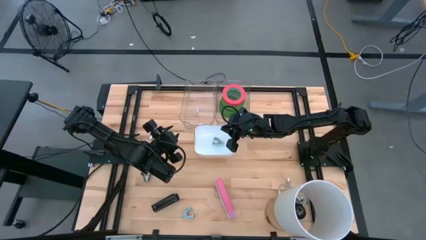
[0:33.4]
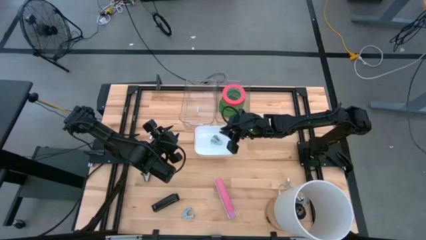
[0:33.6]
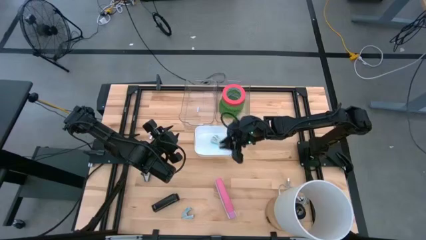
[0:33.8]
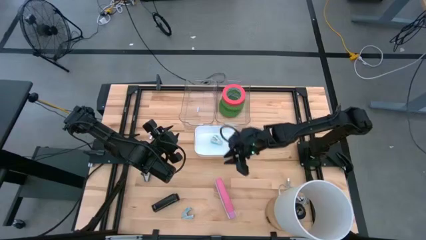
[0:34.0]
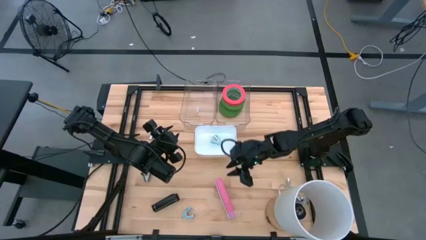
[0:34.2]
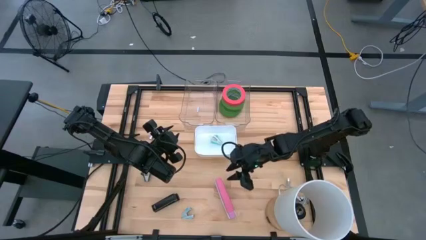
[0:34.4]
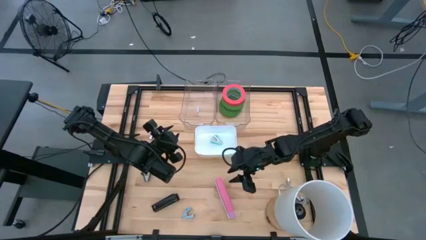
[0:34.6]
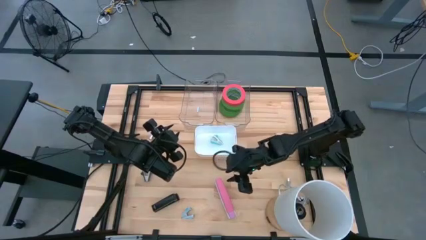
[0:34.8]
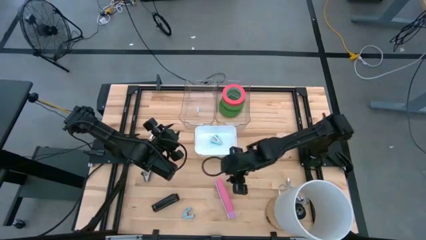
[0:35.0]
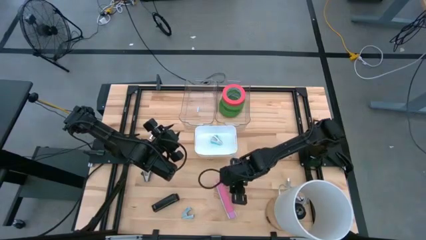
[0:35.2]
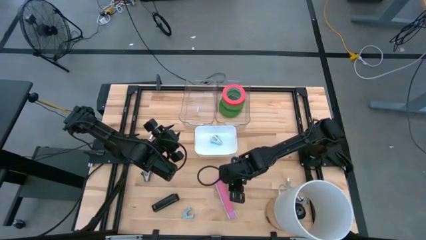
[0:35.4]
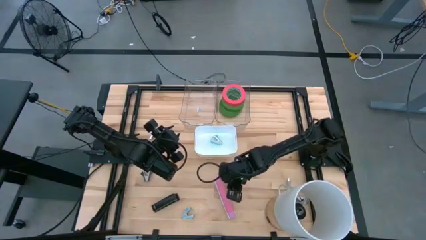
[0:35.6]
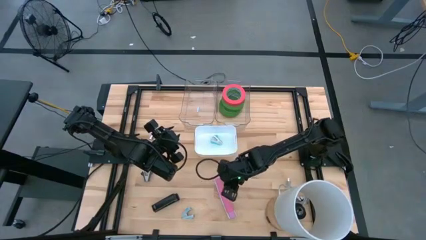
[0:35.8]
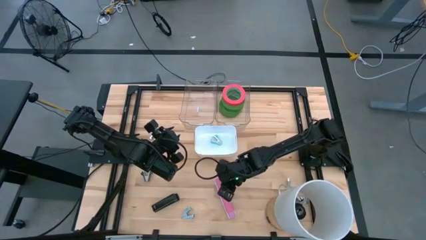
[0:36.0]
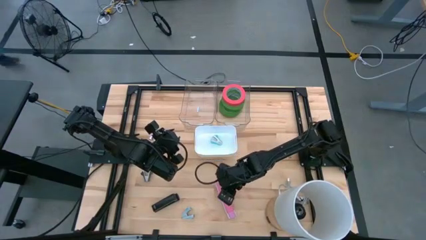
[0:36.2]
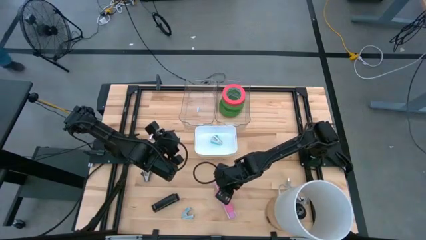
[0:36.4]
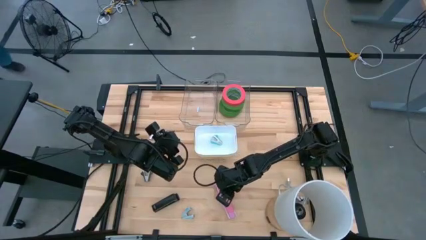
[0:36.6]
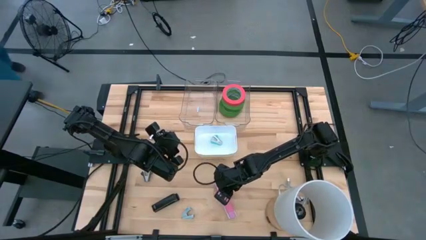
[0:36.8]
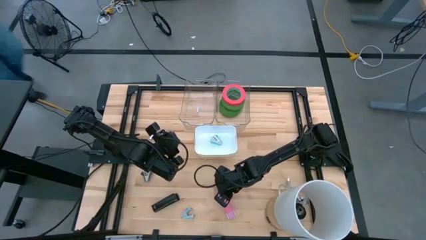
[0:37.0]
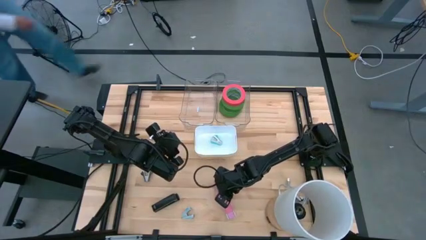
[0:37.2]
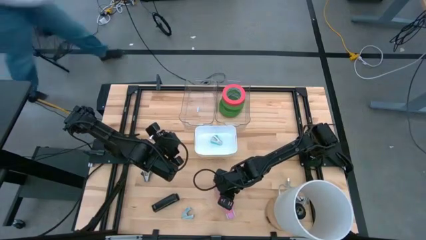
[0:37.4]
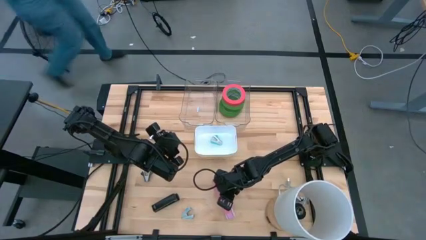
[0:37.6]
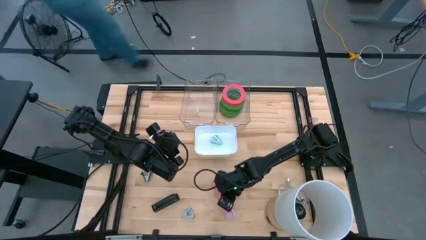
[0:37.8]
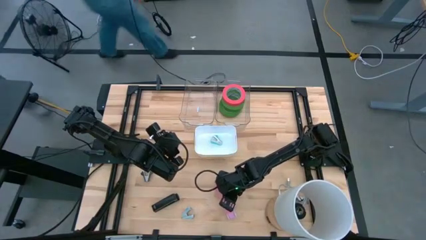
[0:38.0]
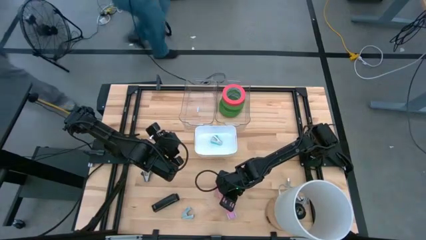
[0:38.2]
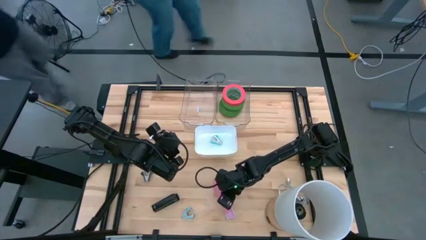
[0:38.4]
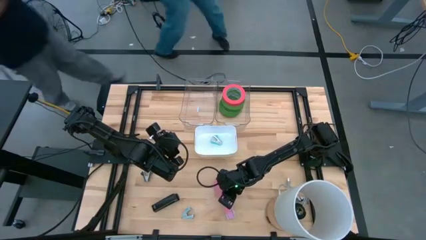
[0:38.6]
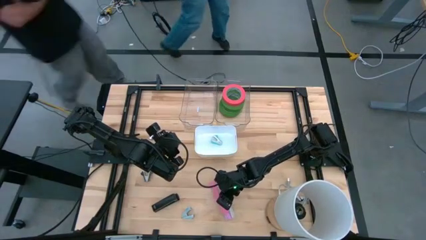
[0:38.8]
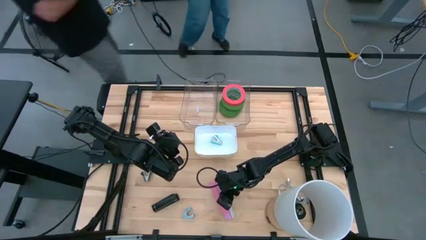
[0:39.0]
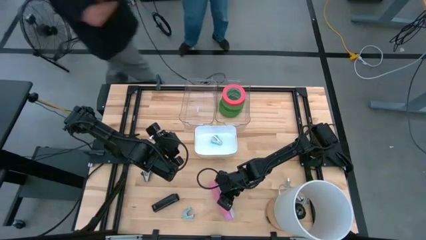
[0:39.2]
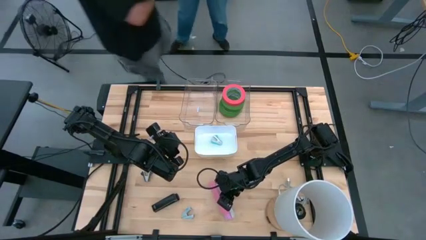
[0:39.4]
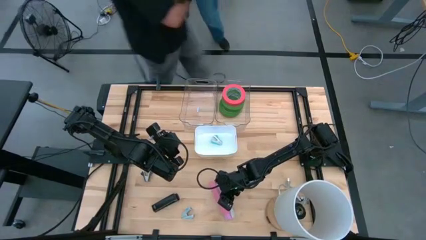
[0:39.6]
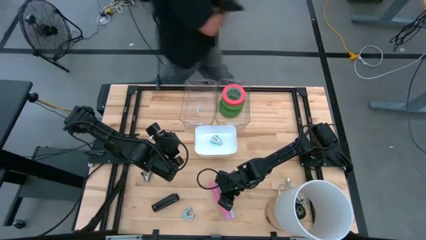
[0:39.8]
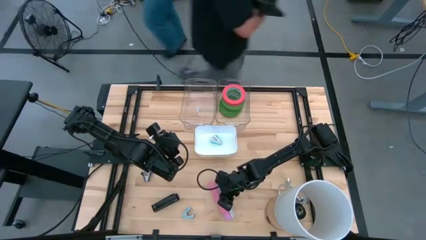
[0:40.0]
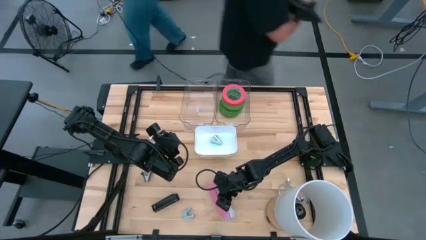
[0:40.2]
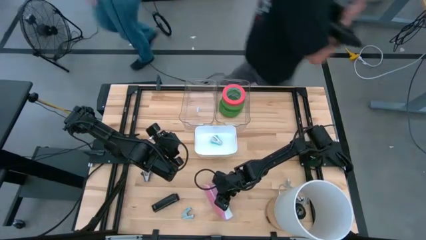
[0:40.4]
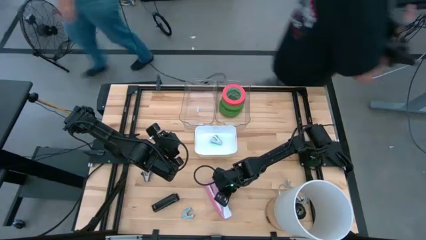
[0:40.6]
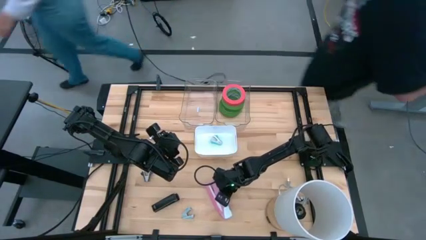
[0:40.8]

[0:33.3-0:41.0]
Task: Pick and place Stapler, Stapler remover, tape
Put the pink stapler into the left transparent bin

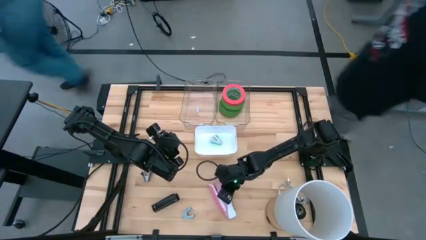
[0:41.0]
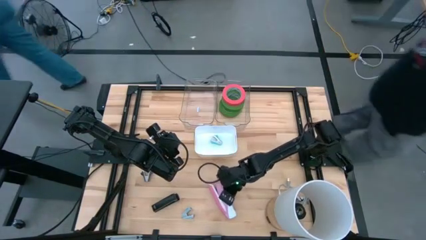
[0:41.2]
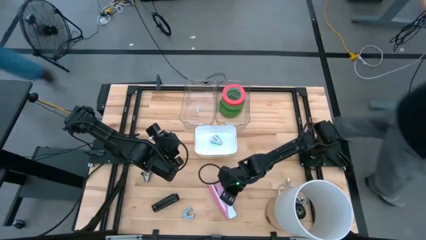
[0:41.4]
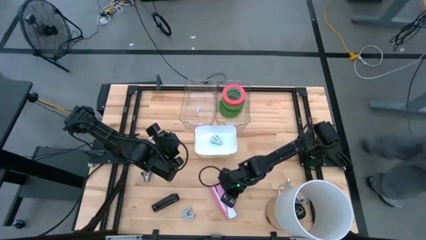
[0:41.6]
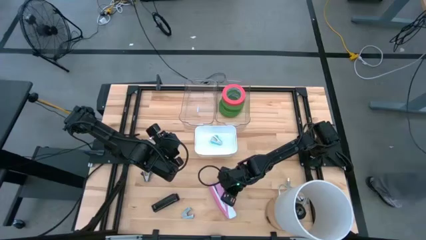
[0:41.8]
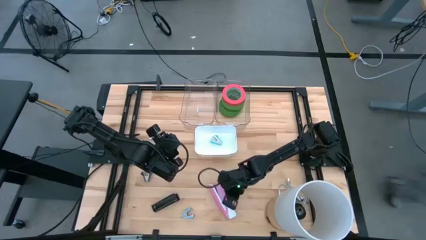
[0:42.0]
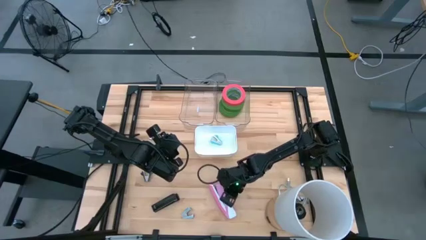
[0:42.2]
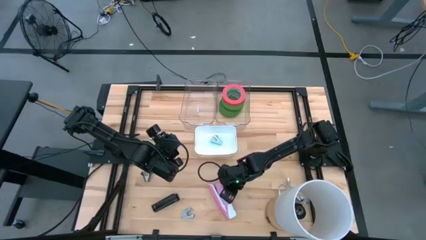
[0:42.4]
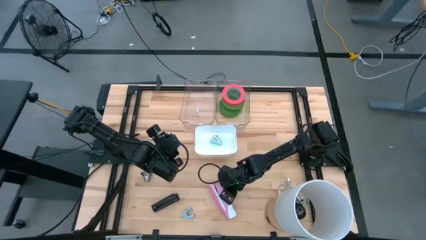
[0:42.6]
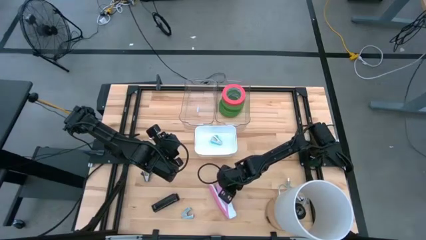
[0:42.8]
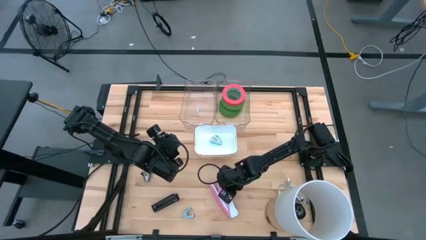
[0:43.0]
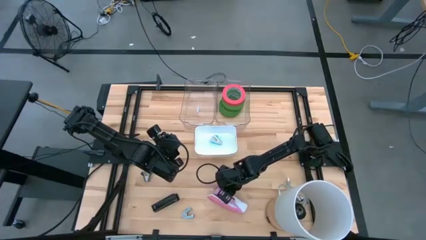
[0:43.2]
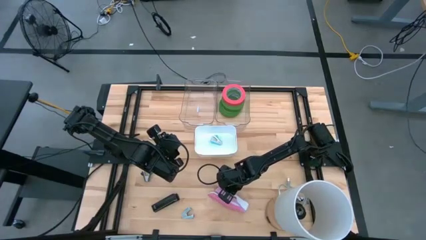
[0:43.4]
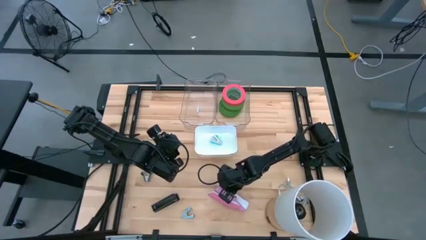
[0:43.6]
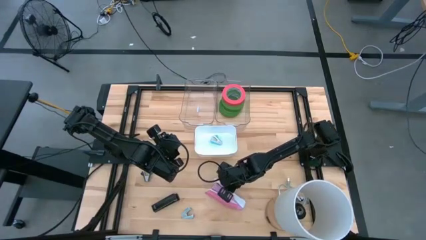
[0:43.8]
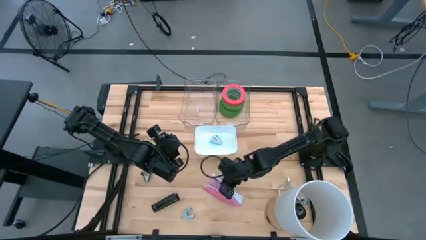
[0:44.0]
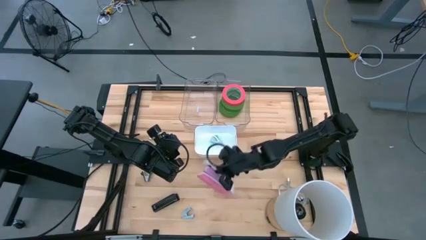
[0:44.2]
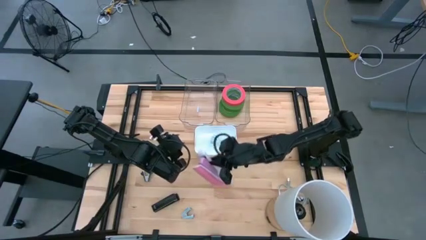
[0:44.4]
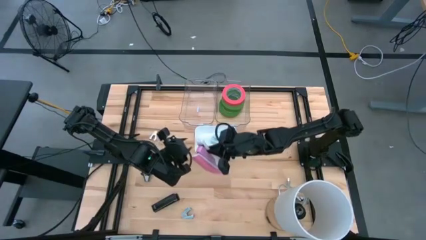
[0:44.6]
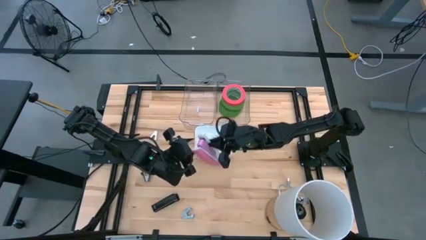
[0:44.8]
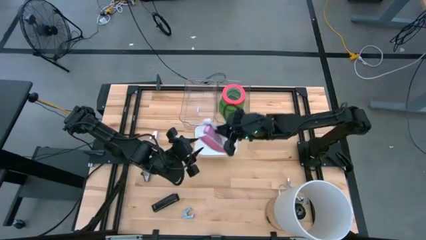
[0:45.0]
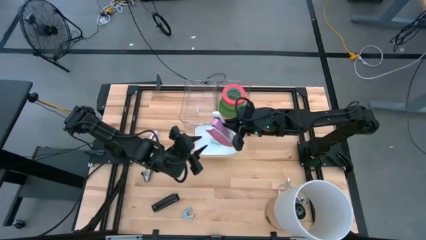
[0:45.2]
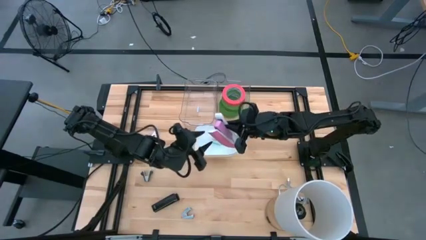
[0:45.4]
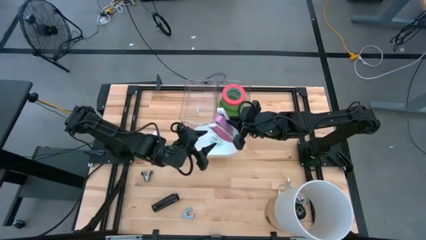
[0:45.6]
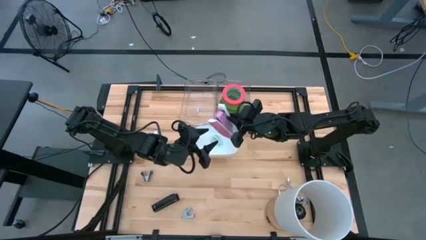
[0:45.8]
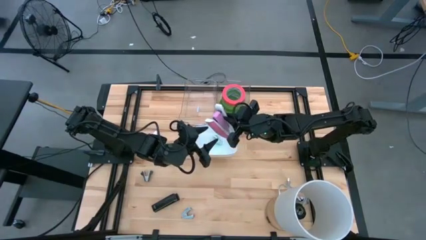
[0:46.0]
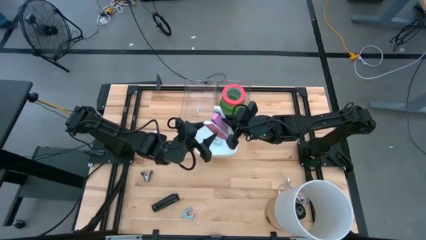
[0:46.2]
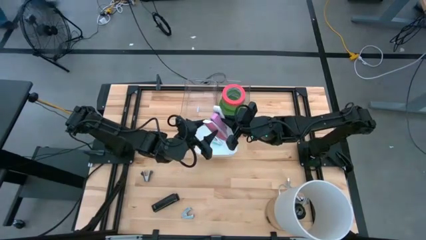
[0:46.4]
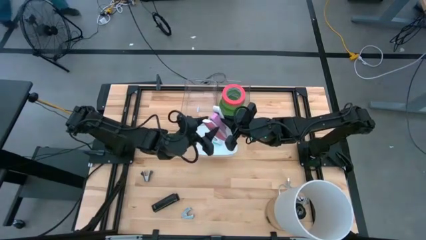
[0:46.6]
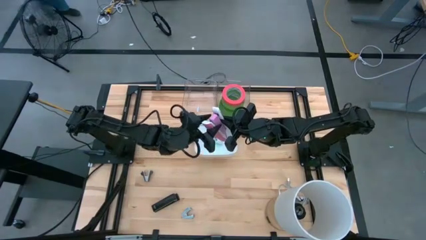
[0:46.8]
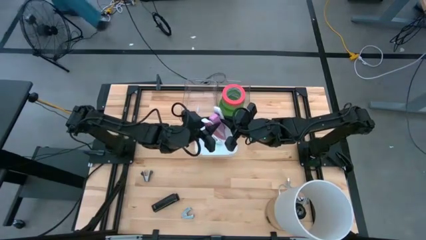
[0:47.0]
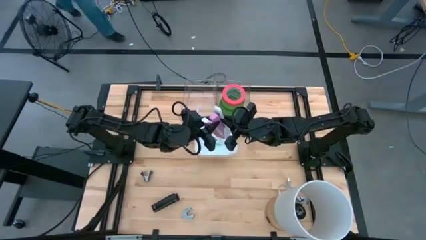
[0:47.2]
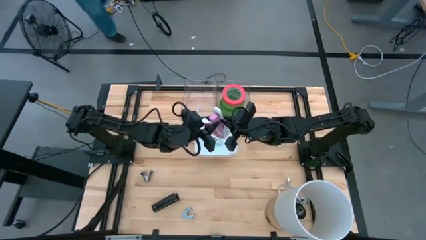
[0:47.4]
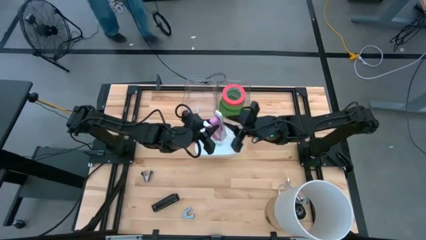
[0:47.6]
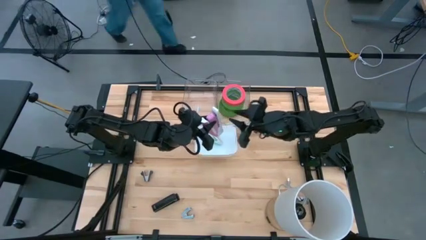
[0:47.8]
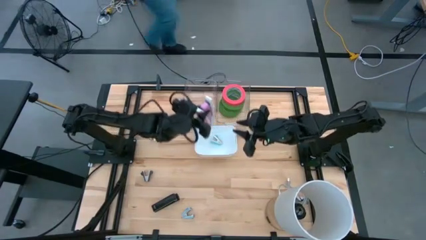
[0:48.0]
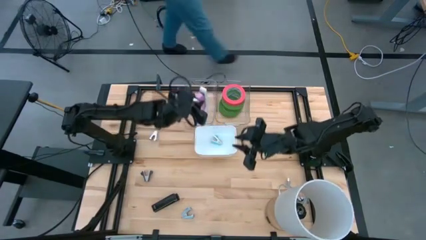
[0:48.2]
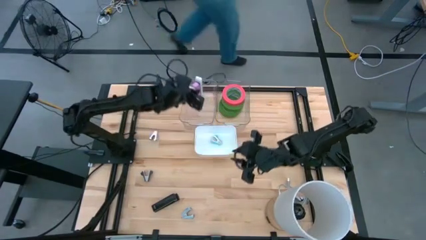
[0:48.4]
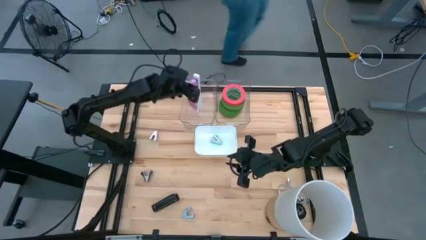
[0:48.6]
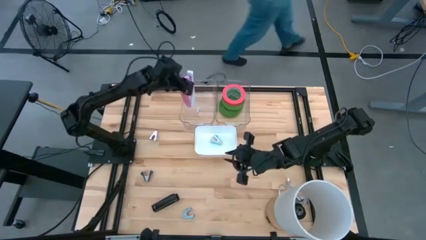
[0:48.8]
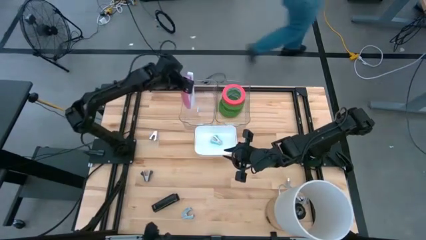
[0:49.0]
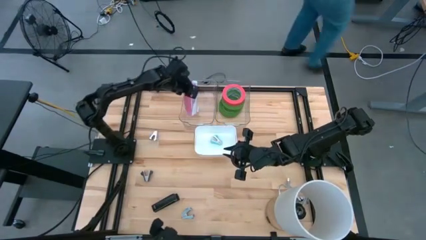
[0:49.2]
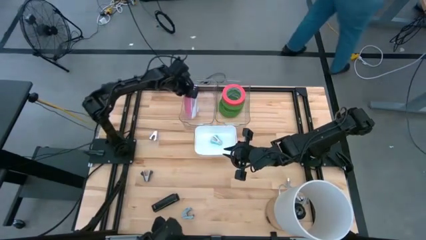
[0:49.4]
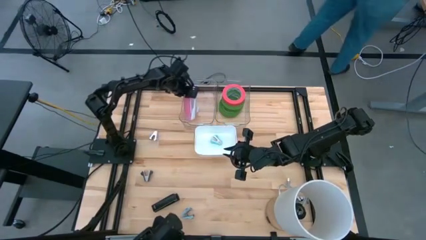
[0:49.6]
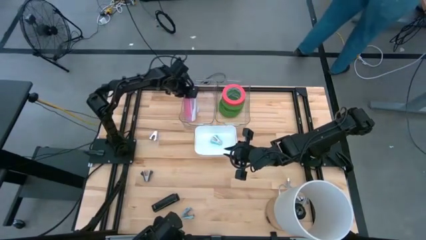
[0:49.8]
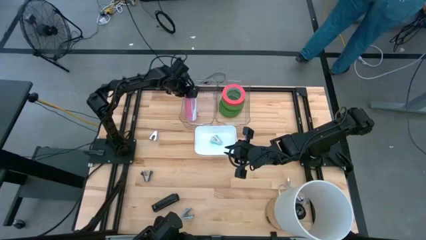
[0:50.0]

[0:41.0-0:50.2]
Put the pink stapler into the left transparent bin
